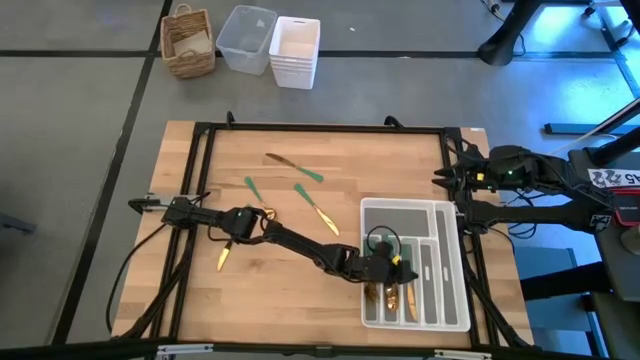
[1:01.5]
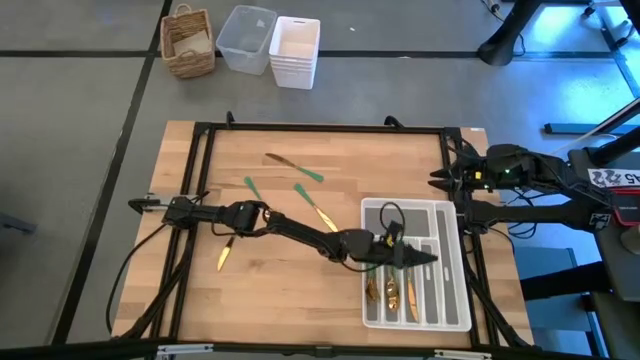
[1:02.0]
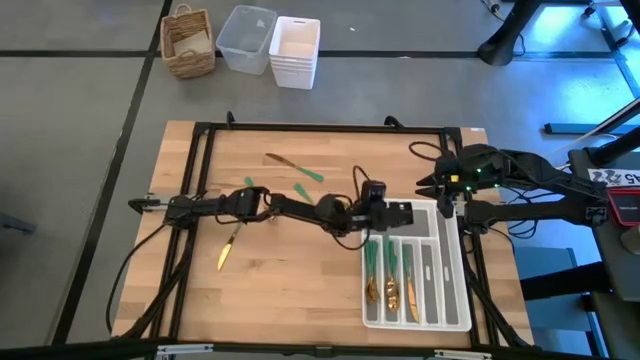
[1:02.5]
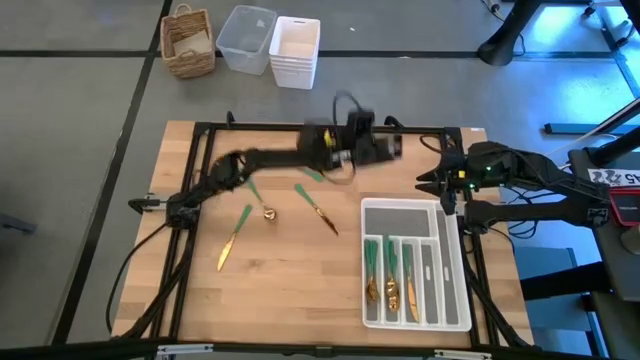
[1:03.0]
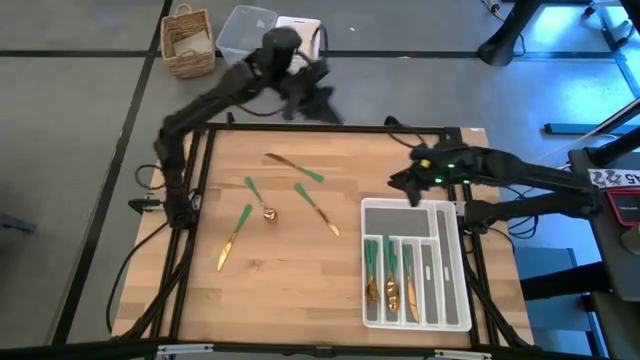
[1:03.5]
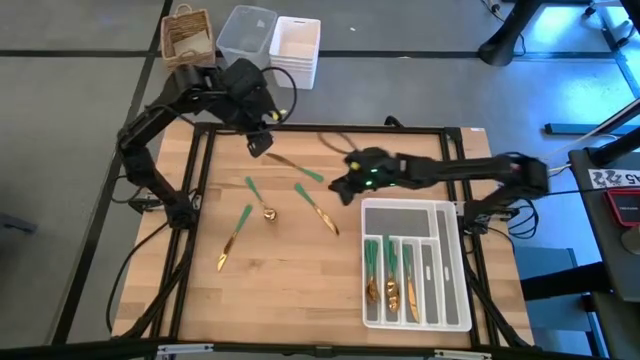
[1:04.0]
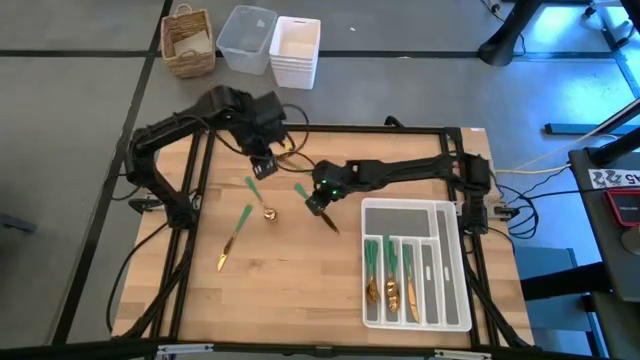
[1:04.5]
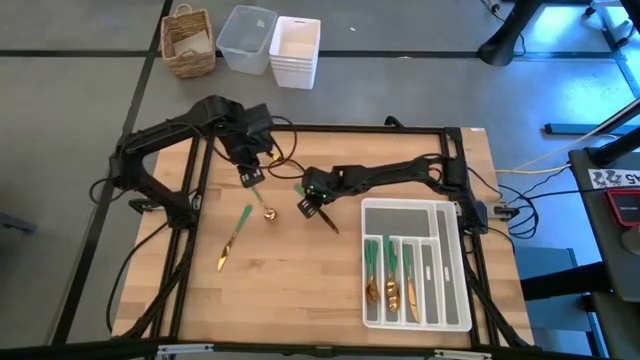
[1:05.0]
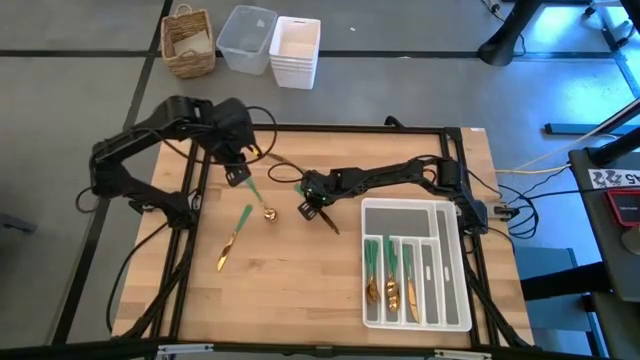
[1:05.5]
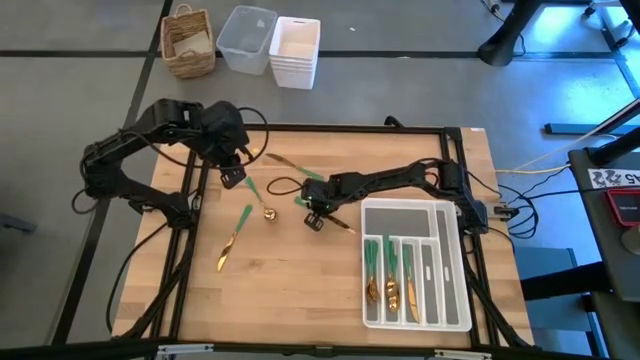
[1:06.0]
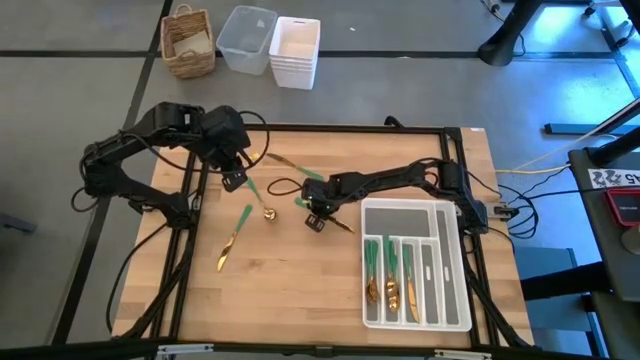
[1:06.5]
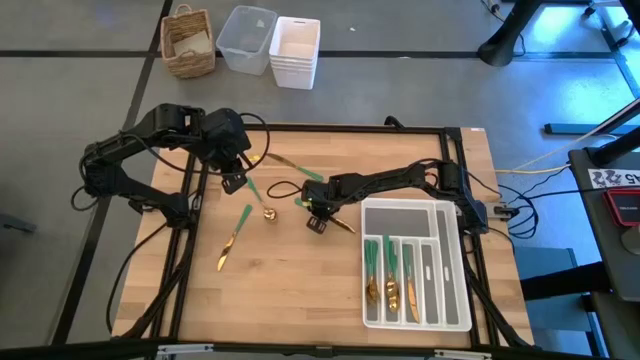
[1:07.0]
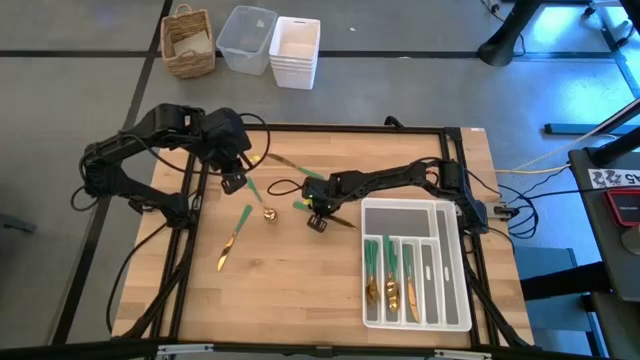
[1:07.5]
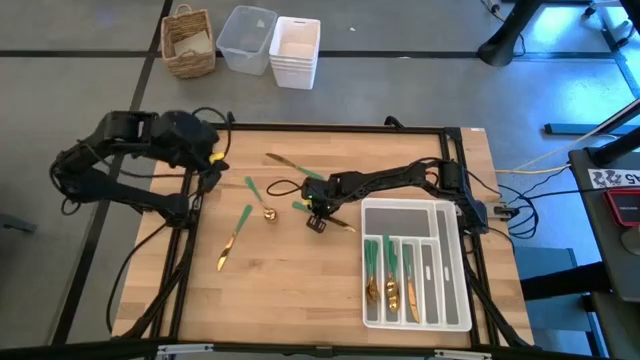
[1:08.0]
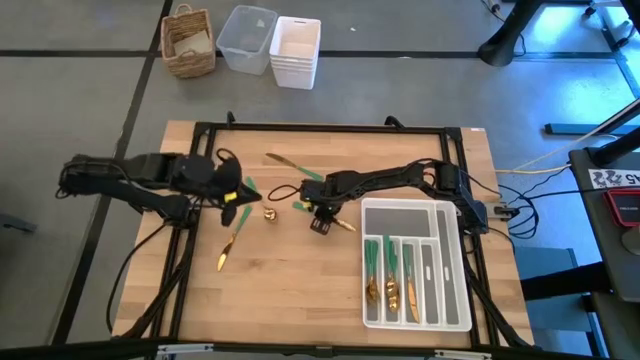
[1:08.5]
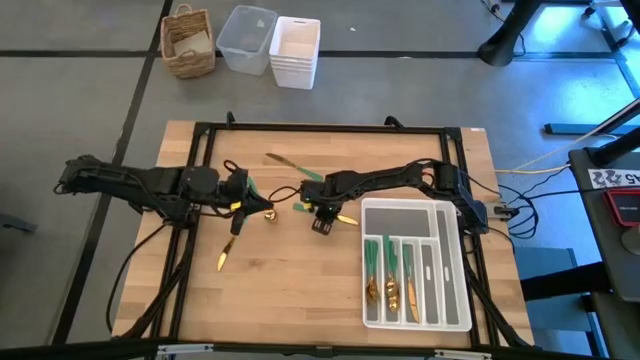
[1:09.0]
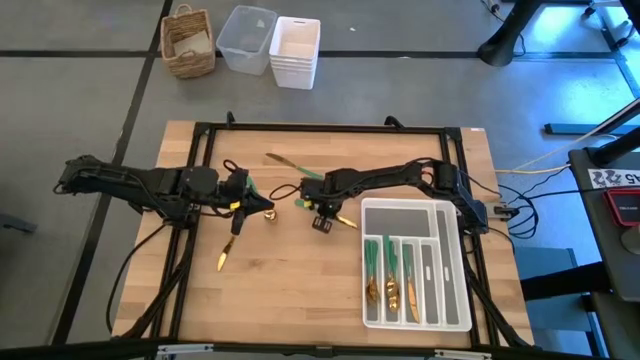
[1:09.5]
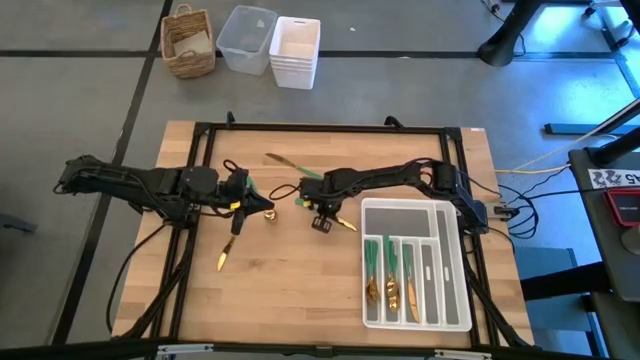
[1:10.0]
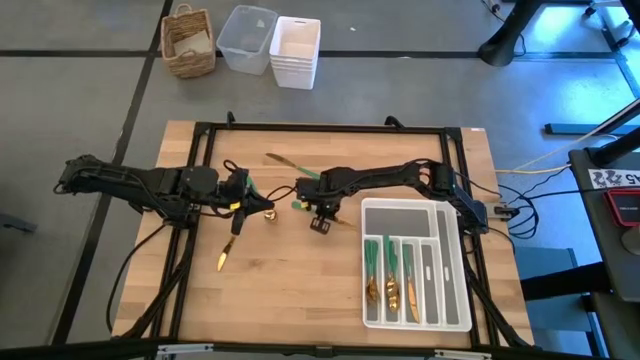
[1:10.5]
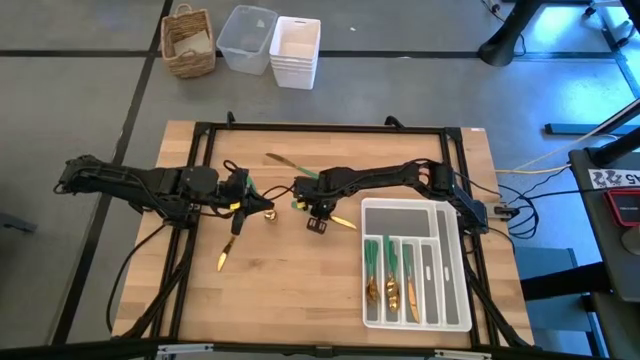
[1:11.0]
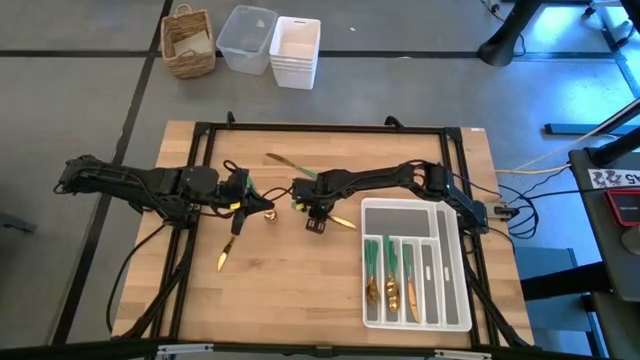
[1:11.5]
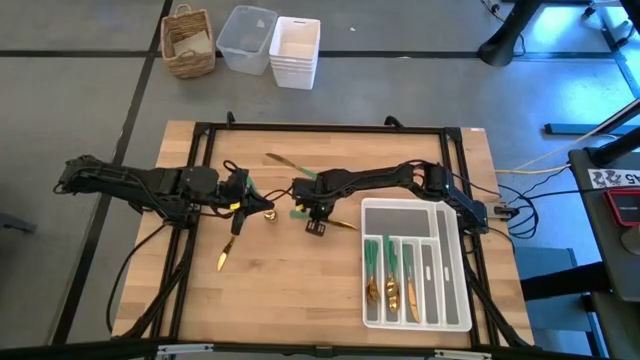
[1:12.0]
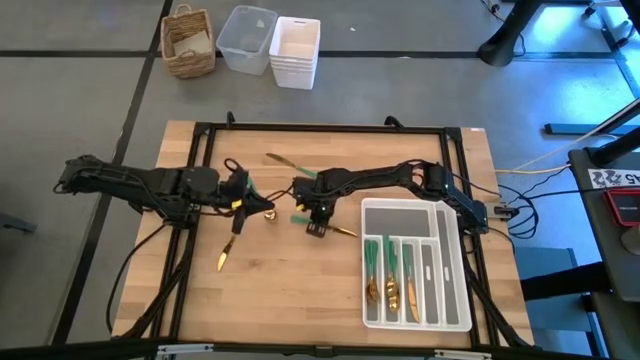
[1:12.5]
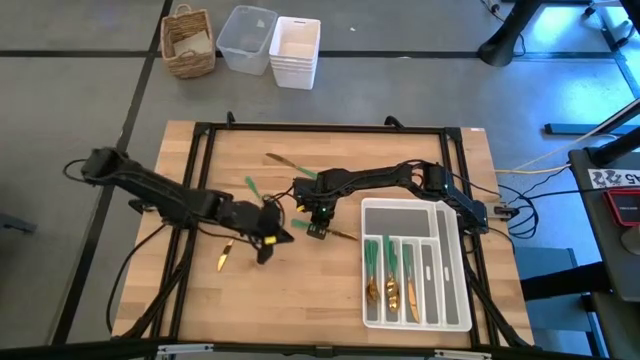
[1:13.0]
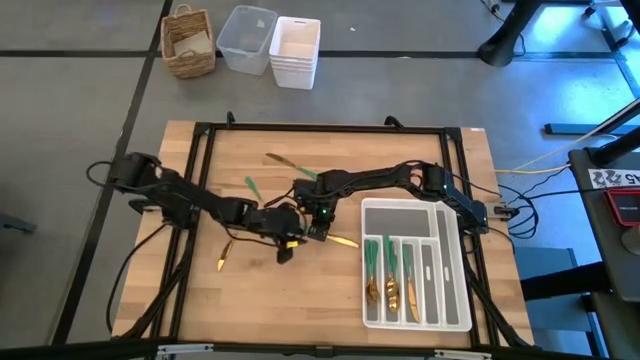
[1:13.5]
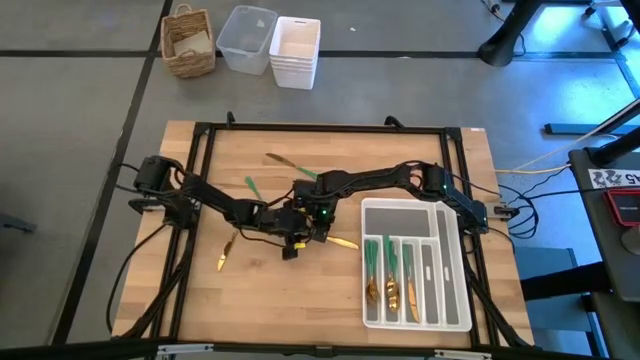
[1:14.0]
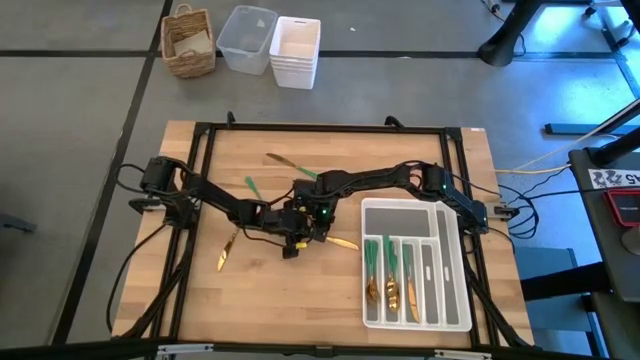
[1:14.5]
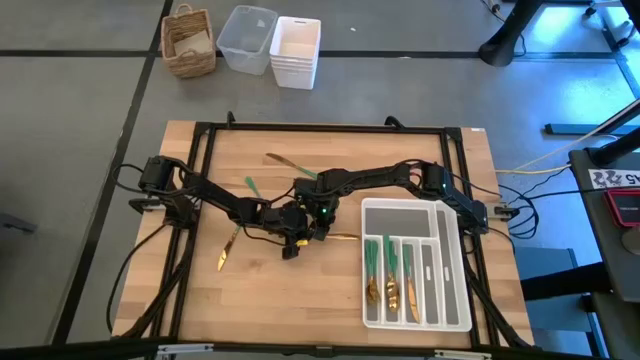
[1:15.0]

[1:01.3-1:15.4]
Task: Sort silverware
Put the green table in the white silverware tray

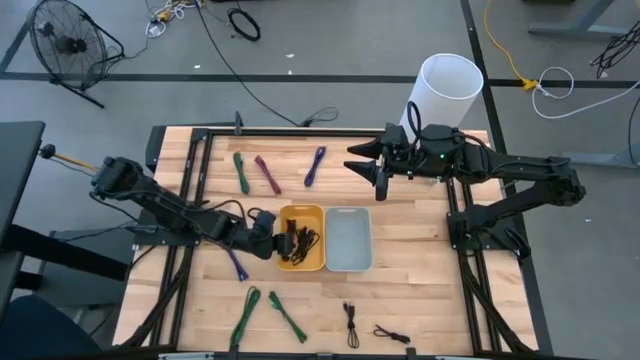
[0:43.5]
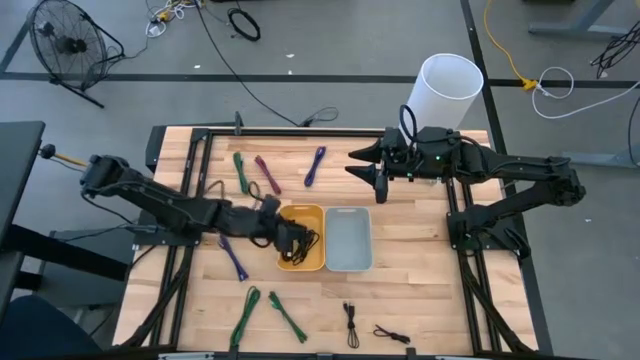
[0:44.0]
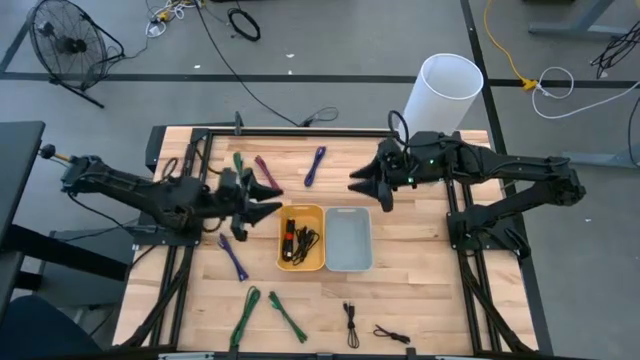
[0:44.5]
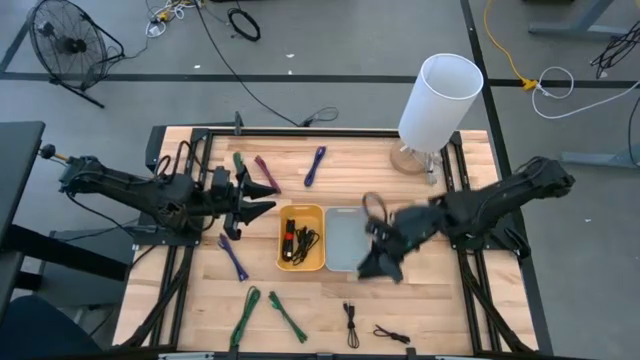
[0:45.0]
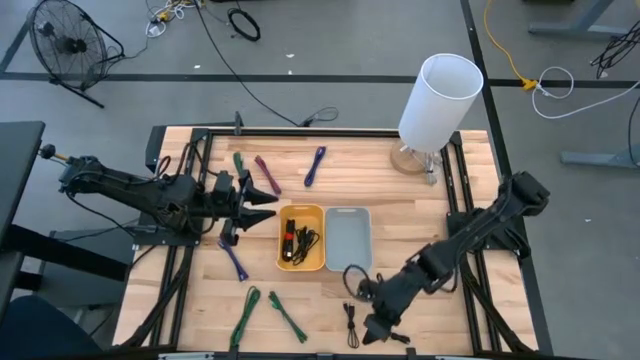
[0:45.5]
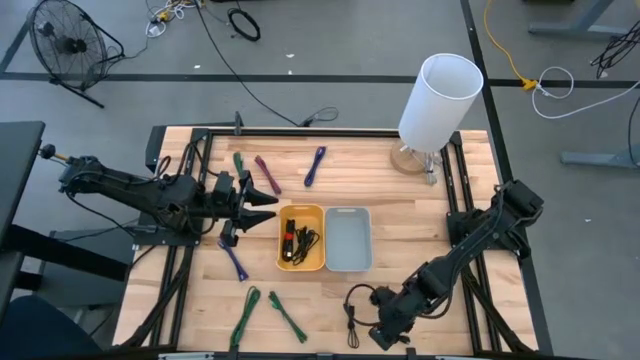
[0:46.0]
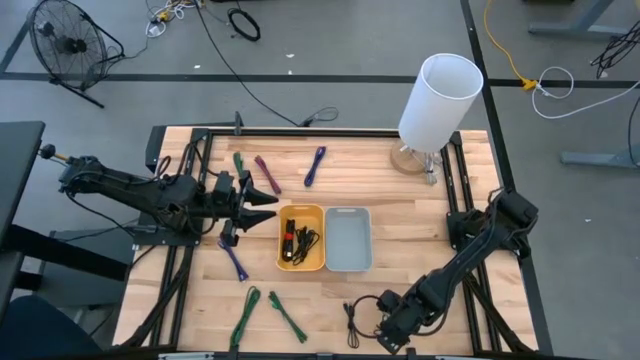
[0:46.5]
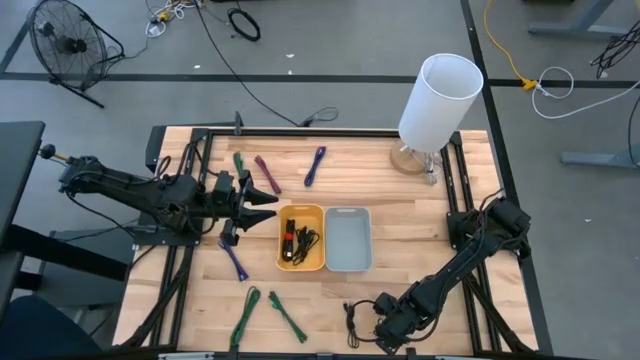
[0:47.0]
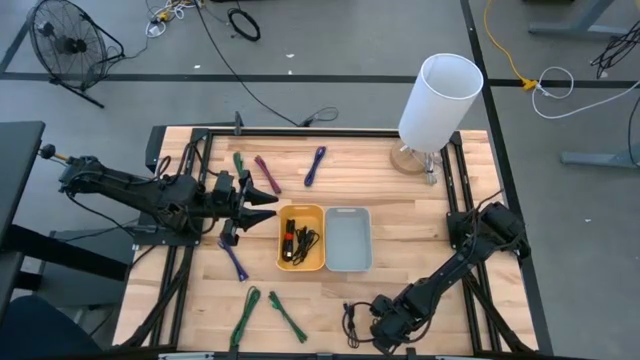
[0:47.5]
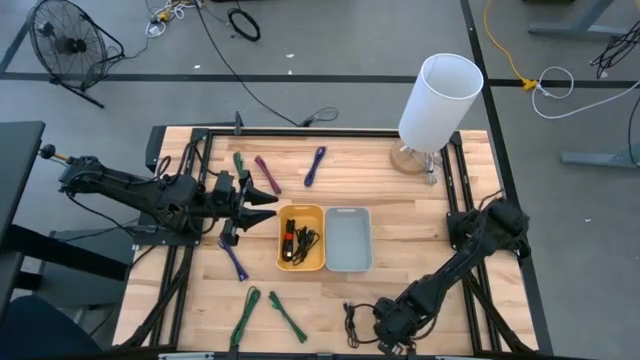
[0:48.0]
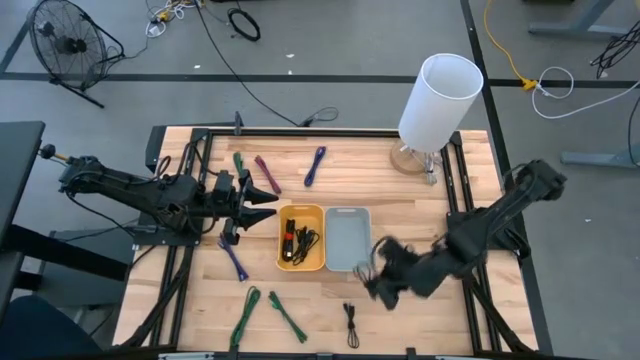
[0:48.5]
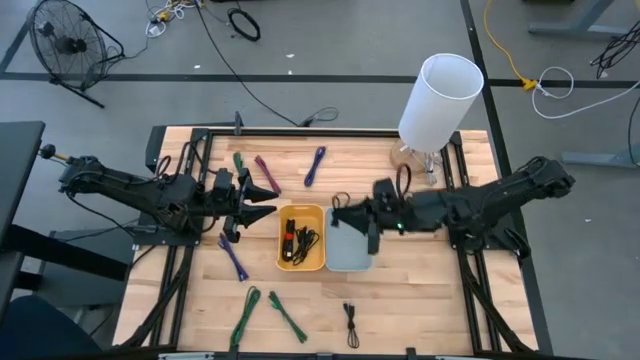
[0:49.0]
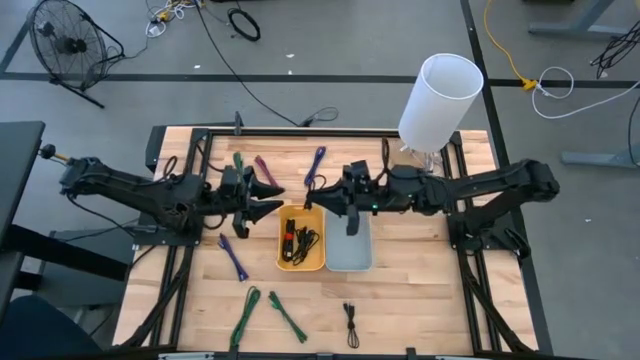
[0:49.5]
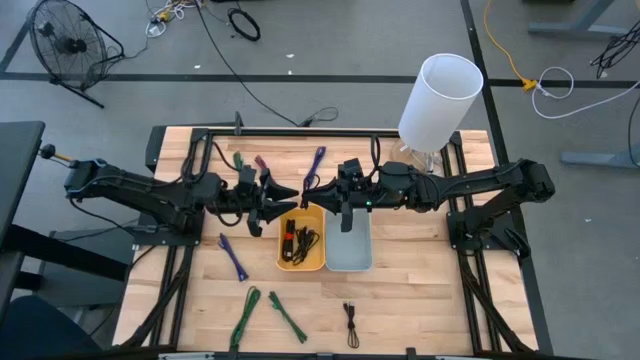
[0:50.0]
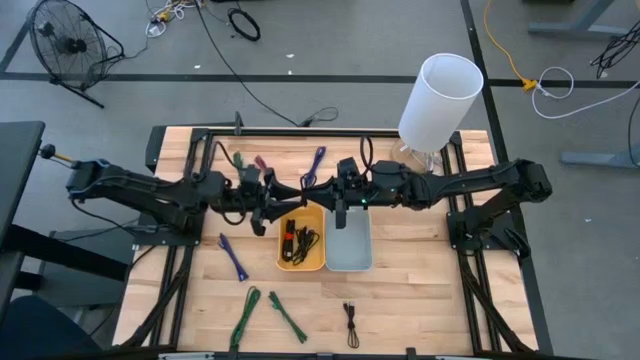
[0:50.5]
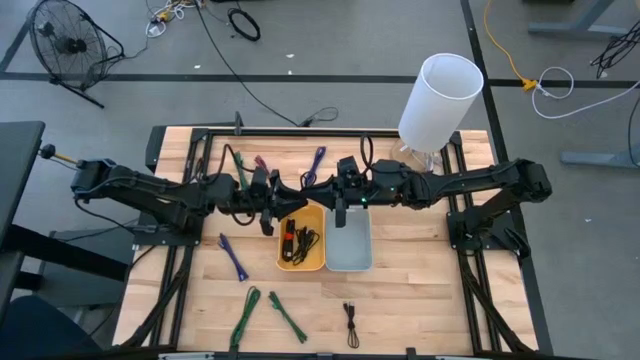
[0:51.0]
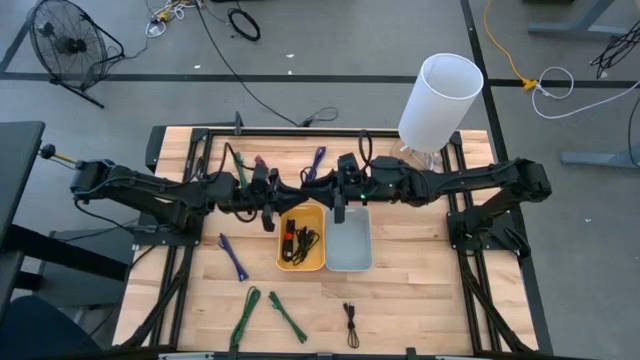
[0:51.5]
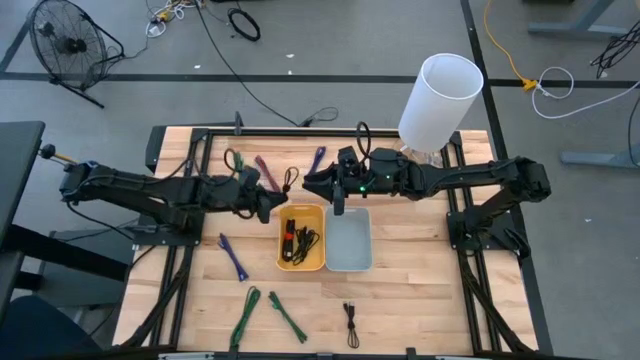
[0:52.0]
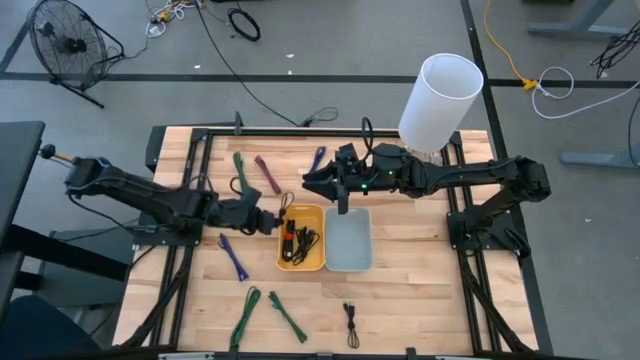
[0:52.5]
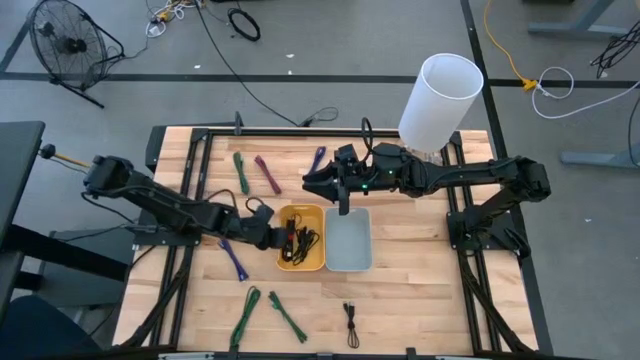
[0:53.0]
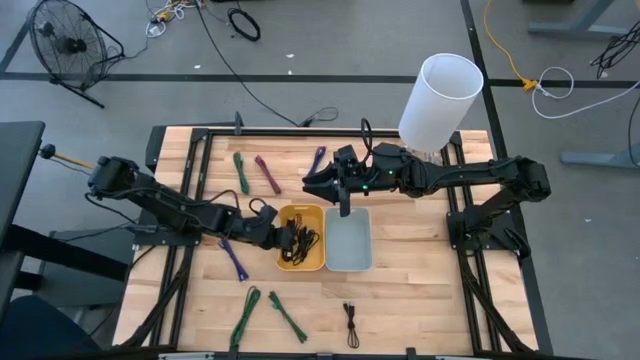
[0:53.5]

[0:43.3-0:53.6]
Task: Pick & Place USB Port
Put the black charger cable into the yellow bin
